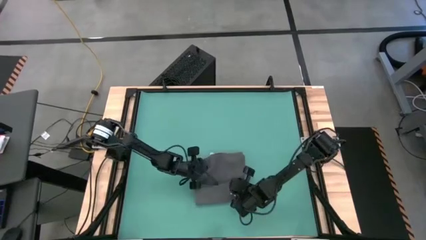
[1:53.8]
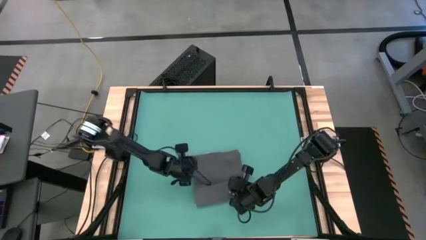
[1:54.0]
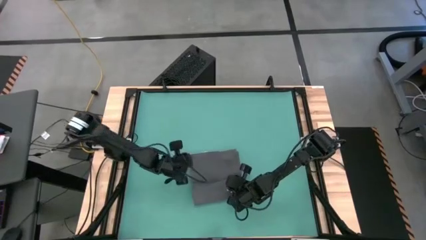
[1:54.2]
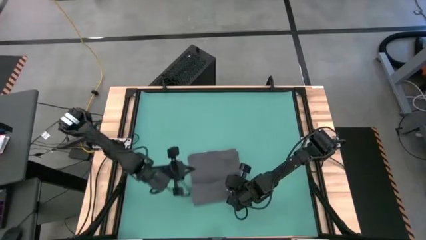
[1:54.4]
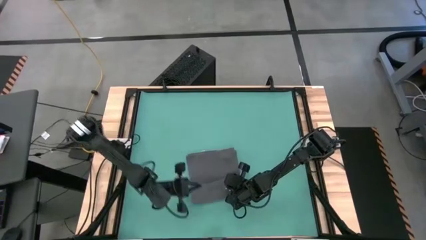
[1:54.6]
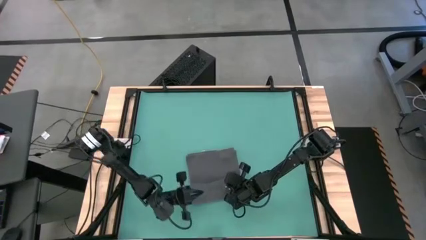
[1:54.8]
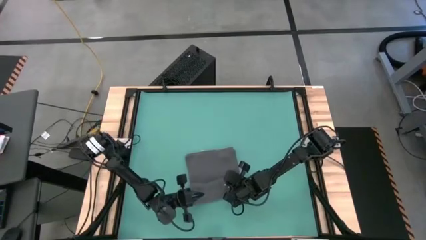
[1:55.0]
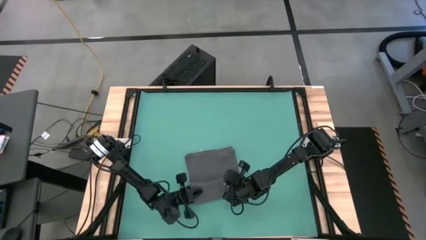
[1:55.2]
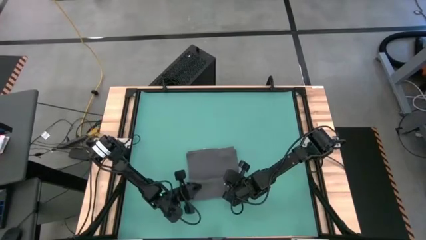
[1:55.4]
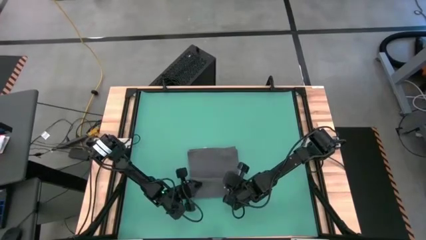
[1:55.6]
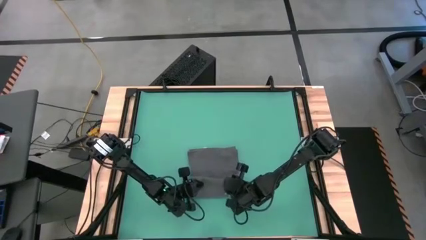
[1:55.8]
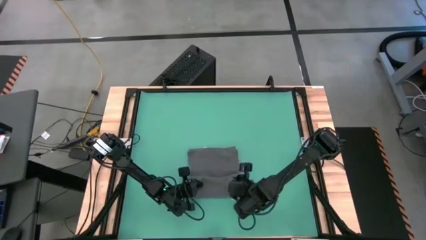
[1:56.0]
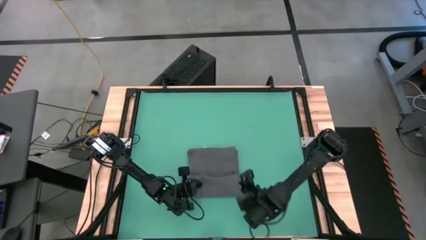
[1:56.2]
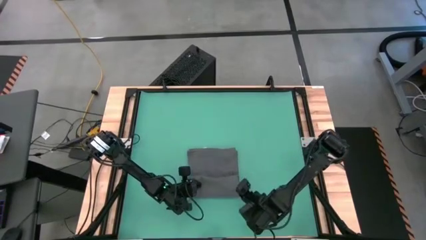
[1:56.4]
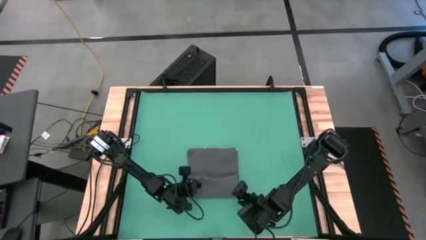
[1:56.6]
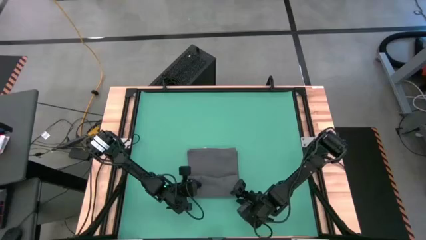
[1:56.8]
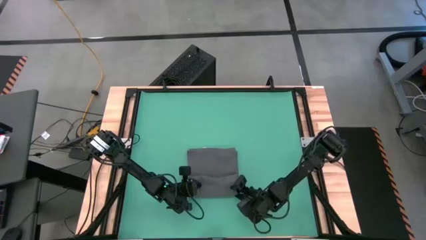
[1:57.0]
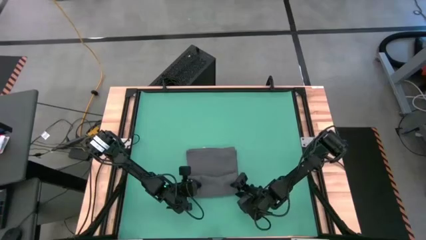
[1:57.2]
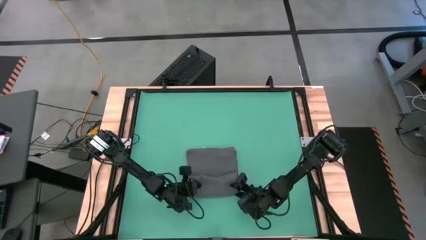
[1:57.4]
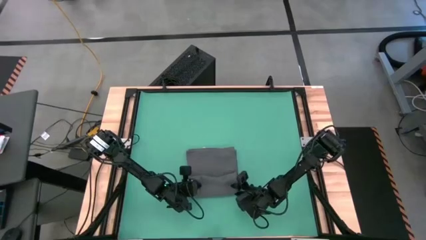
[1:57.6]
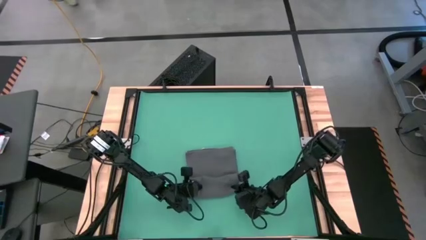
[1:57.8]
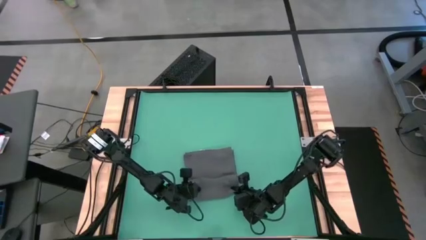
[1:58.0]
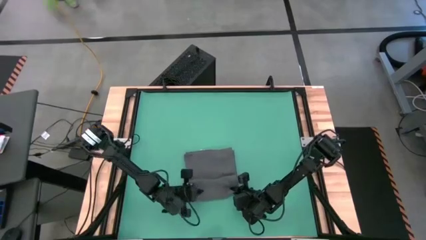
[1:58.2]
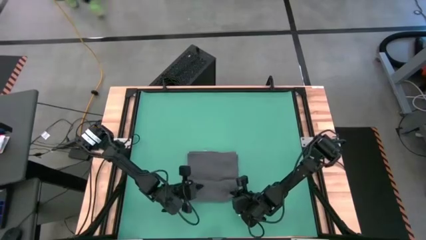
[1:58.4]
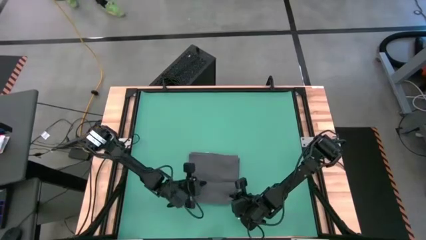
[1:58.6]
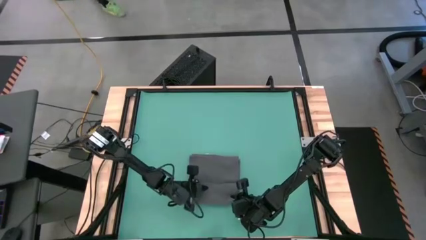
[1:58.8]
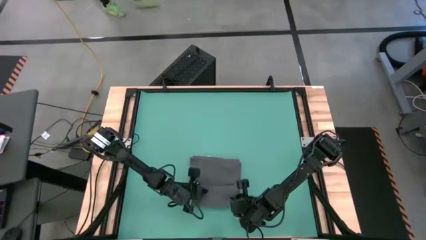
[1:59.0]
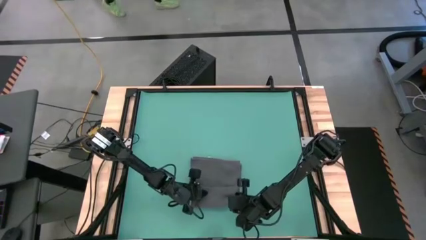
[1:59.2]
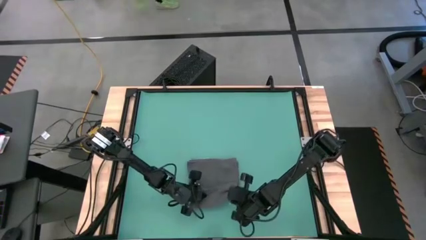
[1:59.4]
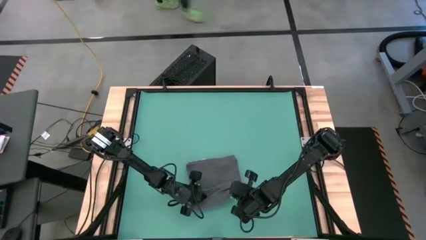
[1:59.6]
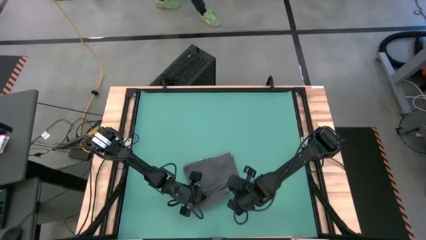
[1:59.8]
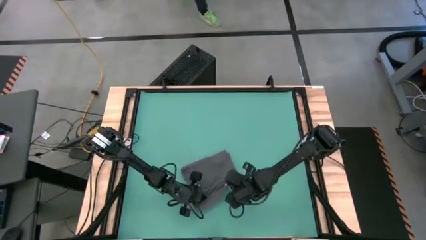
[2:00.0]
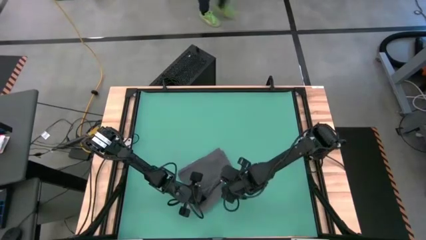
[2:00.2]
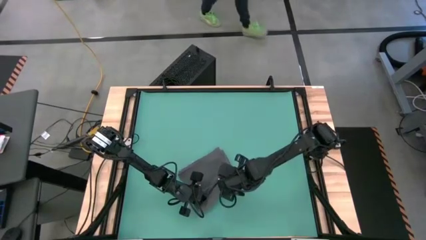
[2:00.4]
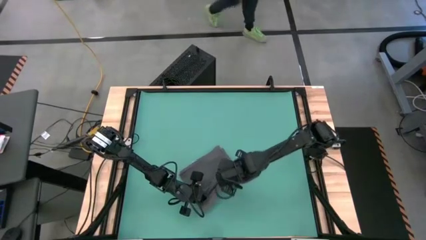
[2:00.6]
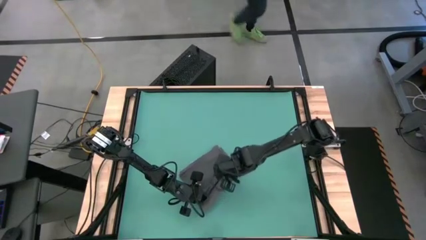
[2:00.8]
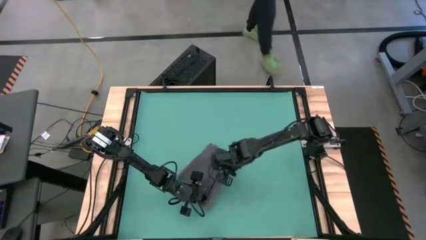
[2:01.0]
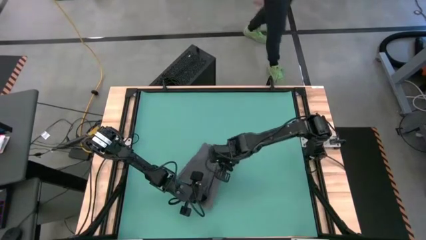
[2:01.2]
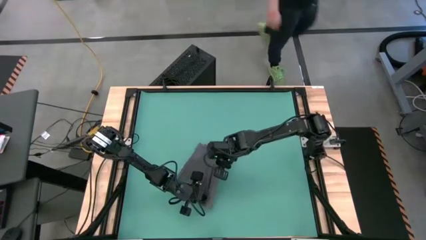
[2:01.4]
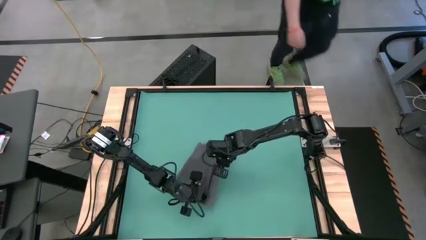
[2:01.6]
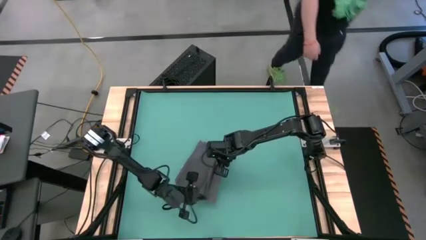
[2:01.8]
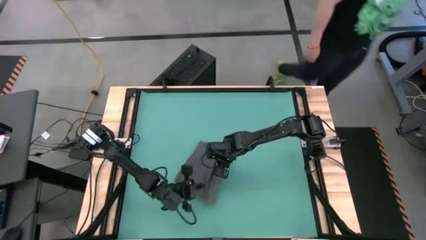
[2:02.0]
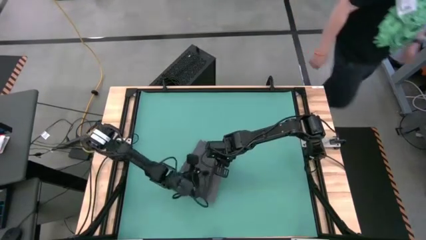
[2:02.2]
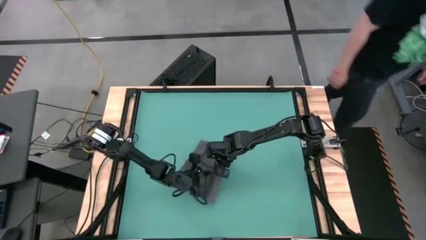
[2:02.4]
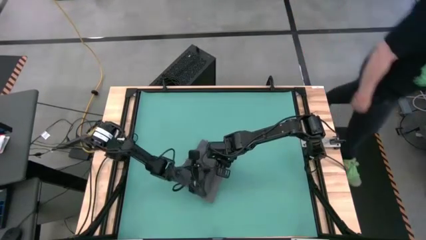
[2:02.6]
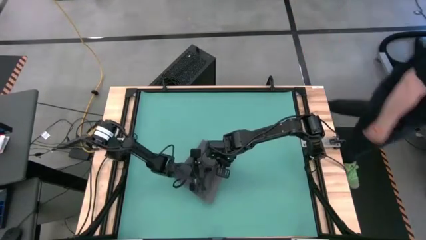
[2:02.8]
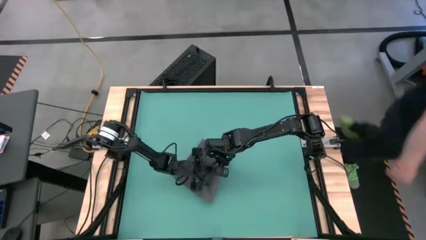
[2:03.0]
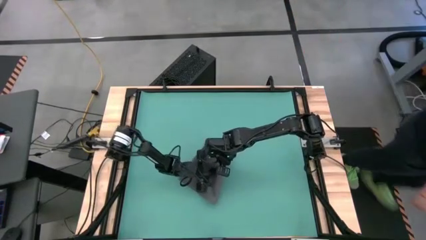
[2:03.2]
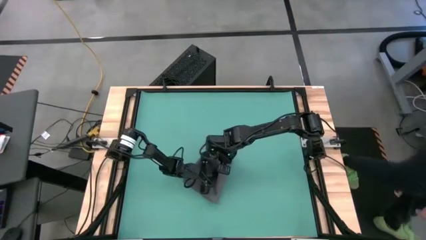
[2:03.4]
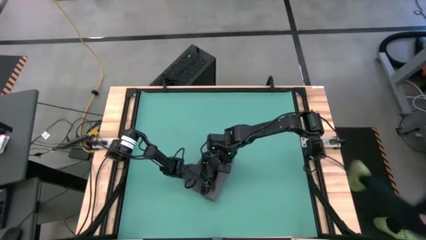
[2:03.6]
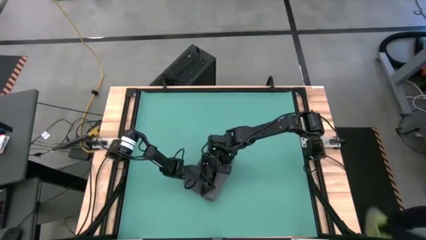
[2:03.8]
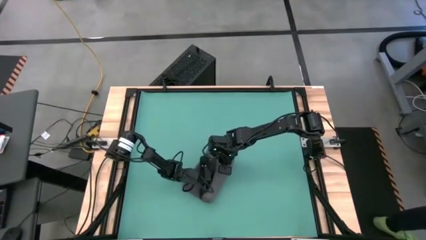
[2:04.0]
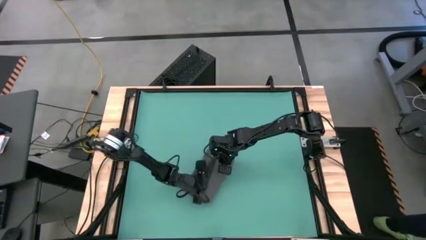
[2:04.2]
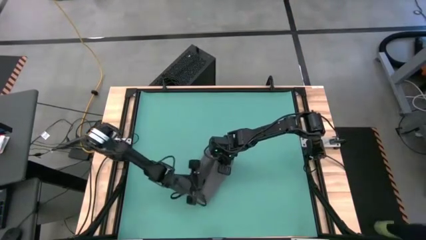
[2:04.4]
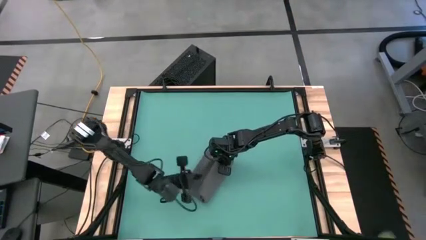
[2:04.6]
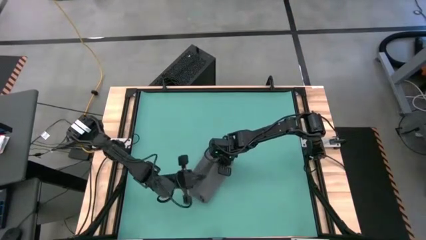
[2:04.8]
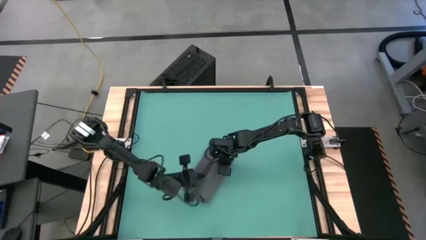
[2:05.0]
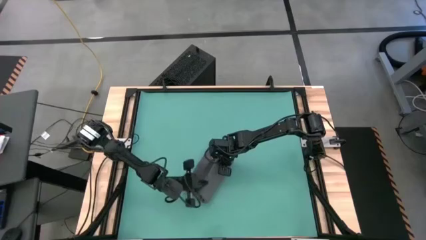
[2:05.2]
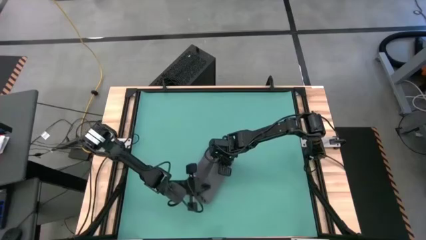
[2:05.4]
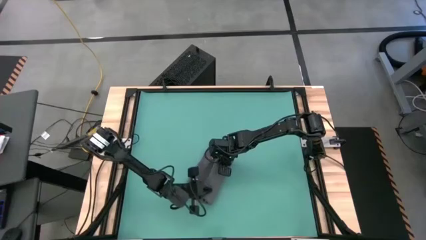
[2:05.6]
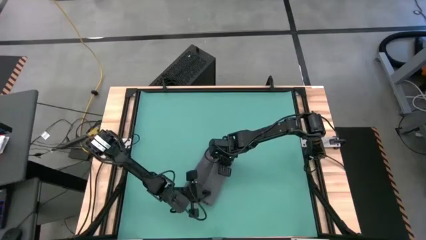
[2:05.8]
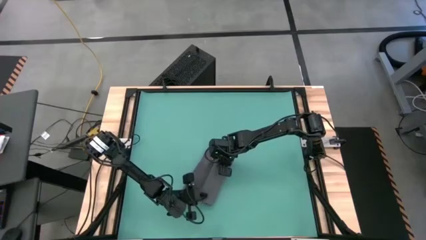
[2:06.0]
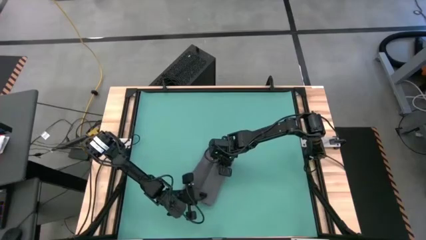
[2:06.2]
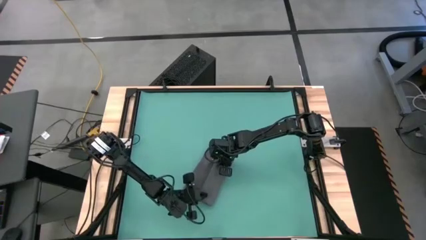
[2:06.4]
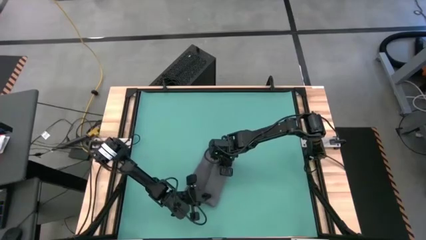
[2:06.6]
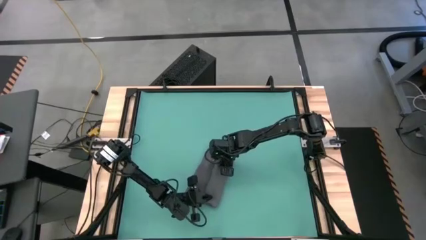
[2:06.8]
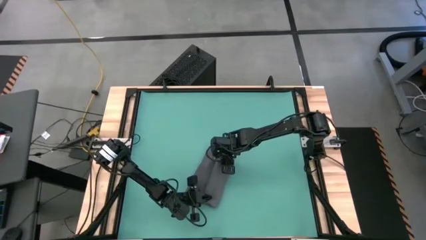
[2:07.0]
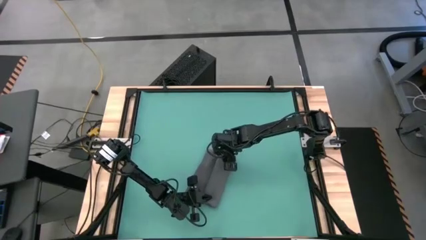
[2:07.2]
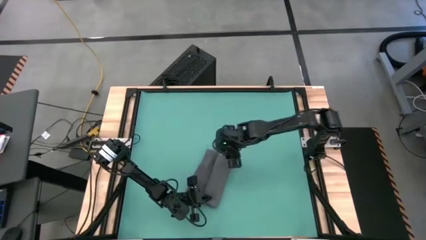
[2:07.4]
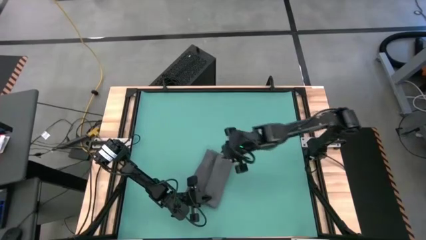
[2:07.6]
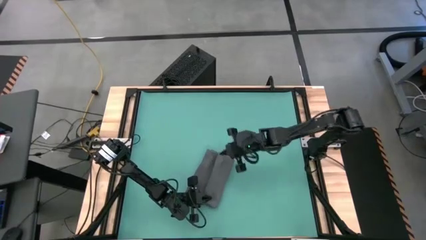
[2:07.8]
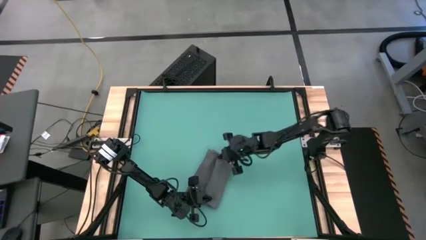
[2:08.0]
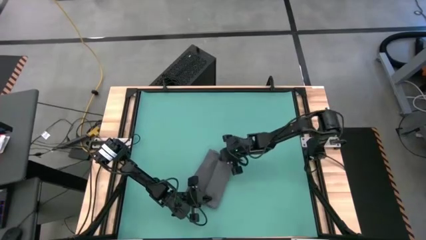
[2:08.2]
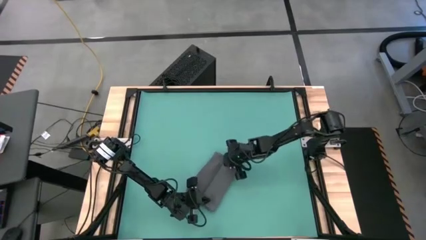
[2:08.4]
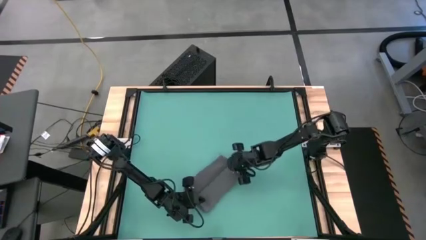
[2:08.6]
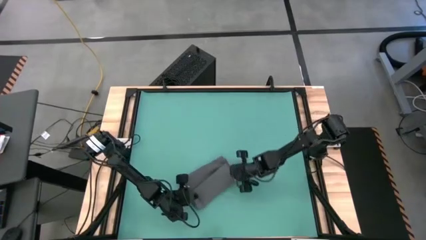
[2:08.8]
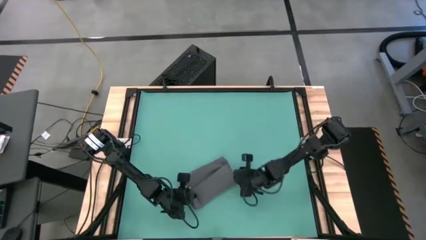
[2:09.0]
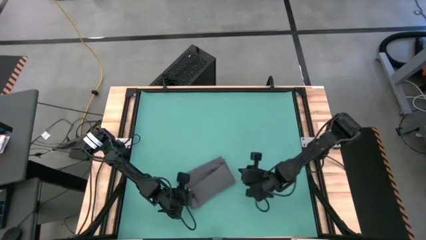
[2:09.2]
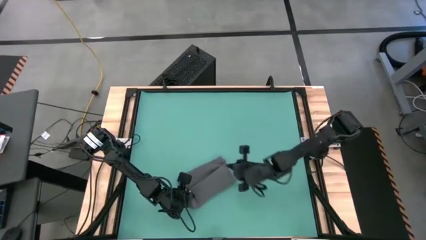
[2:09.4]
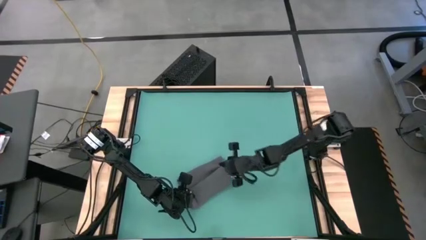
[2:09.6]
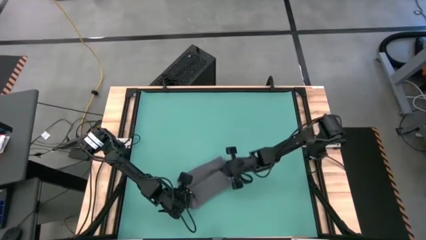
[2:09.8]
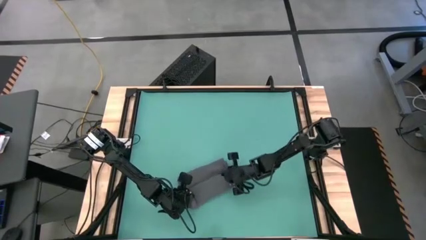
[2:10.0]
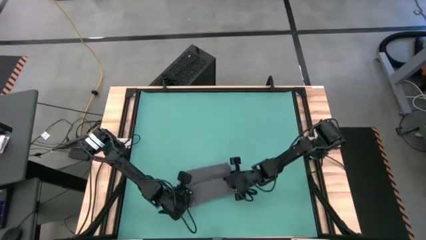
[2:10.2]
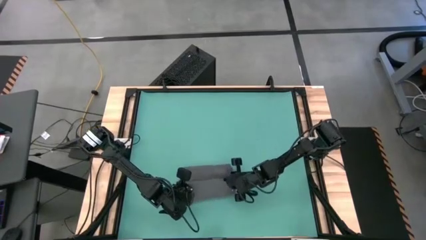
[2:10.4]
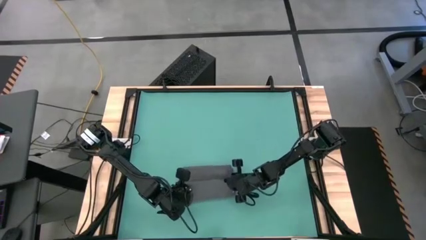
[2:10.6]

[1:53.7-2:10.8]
Task: Roll towel
Roll the gray towel
